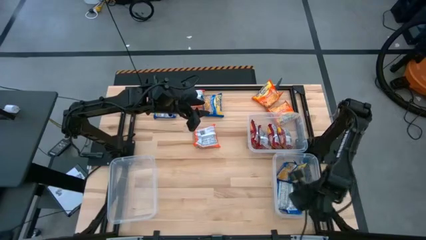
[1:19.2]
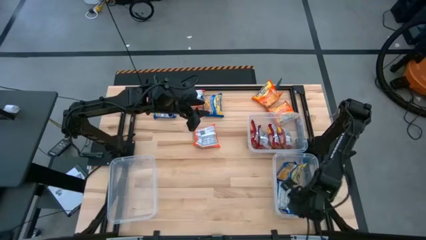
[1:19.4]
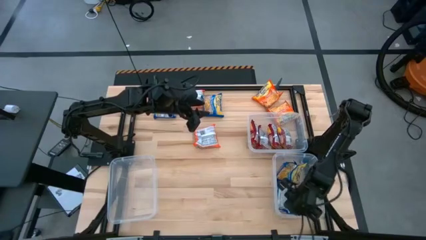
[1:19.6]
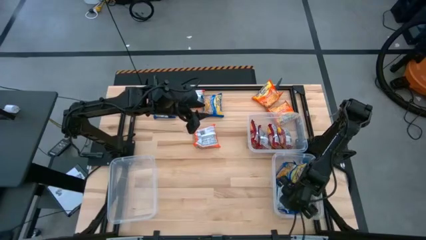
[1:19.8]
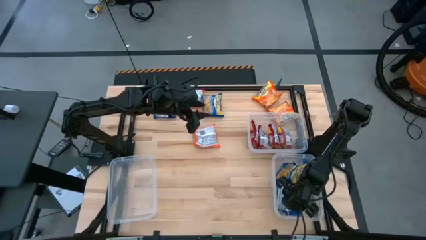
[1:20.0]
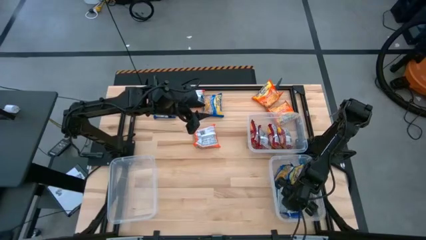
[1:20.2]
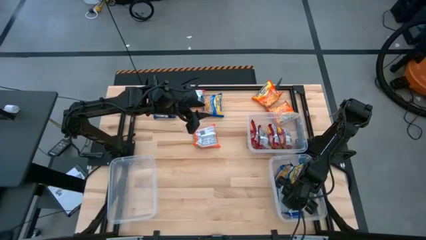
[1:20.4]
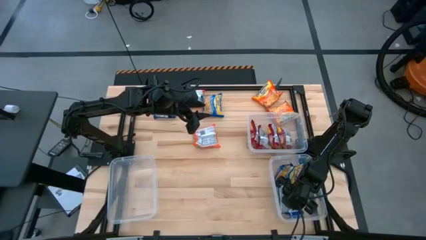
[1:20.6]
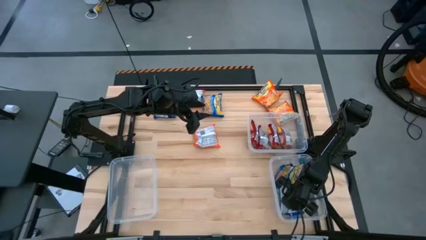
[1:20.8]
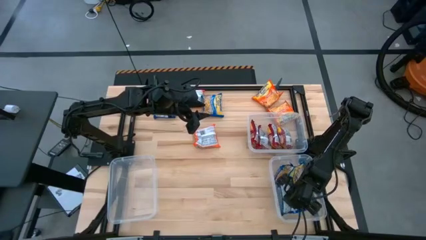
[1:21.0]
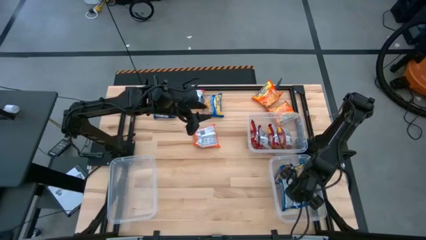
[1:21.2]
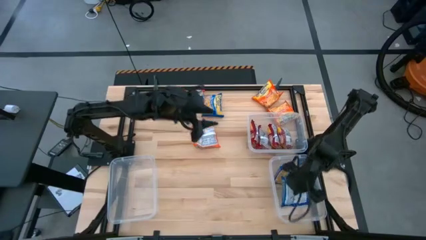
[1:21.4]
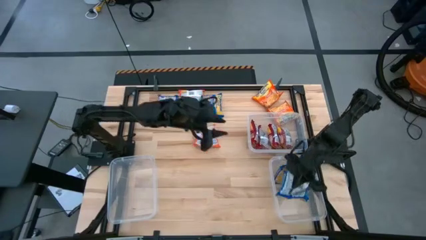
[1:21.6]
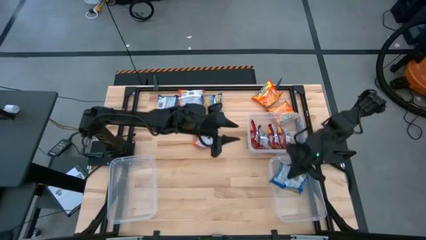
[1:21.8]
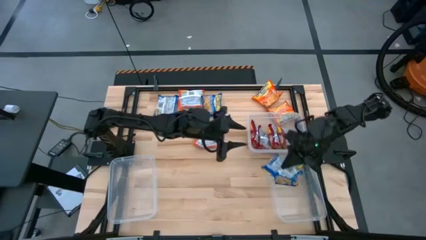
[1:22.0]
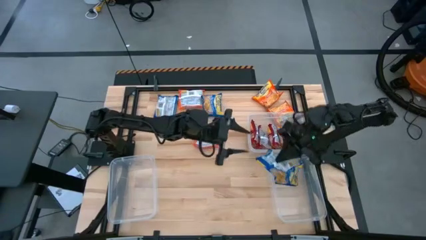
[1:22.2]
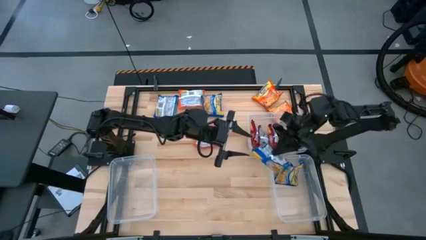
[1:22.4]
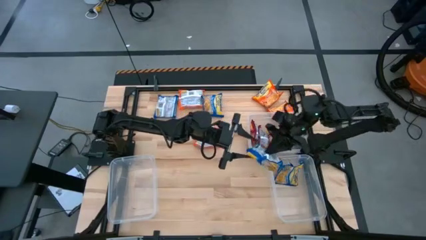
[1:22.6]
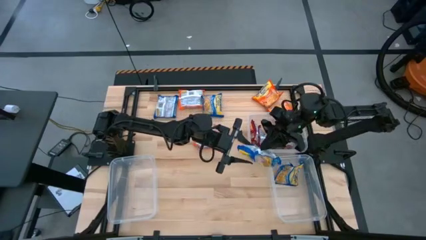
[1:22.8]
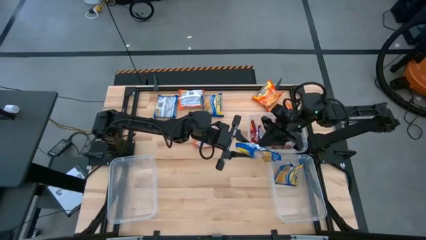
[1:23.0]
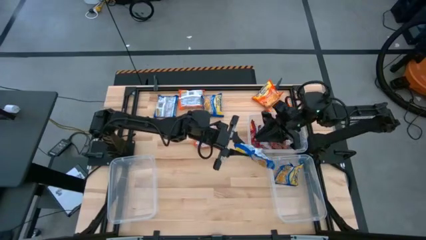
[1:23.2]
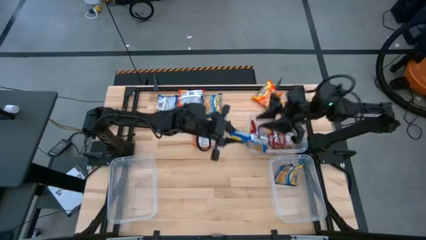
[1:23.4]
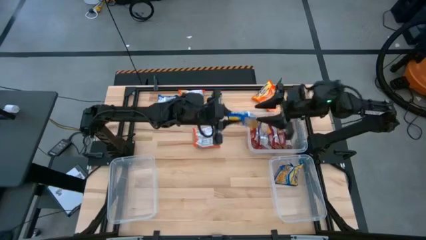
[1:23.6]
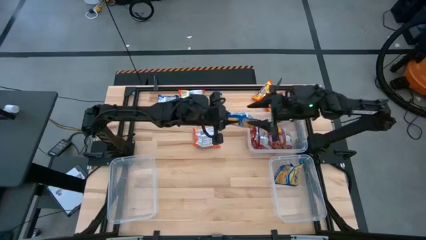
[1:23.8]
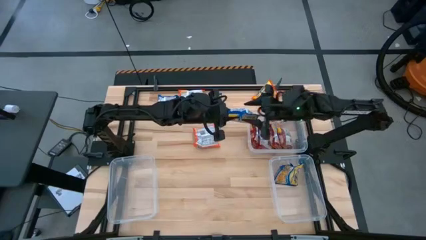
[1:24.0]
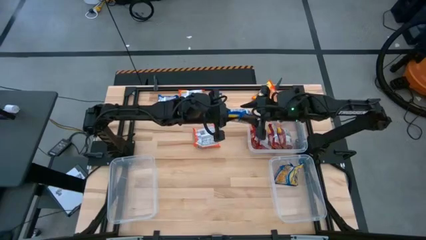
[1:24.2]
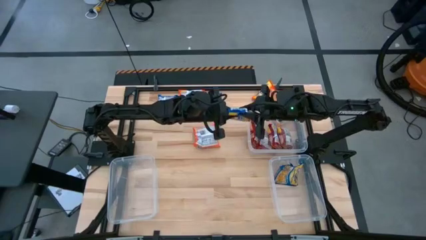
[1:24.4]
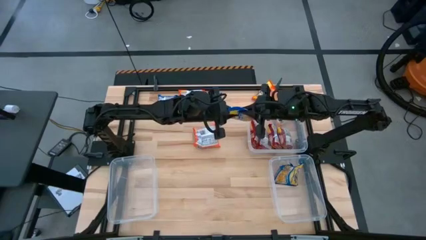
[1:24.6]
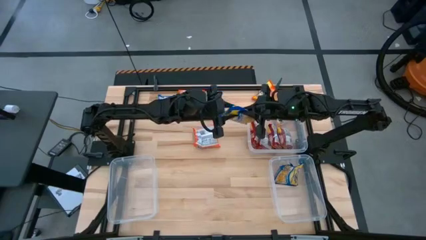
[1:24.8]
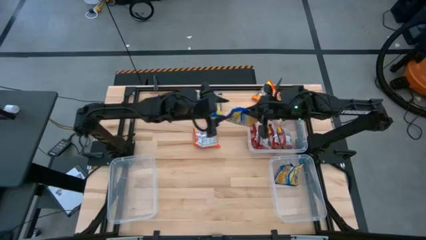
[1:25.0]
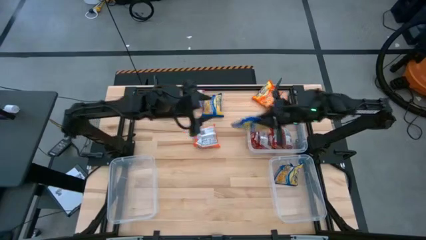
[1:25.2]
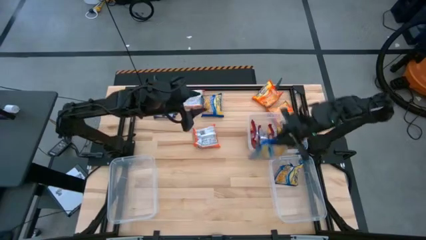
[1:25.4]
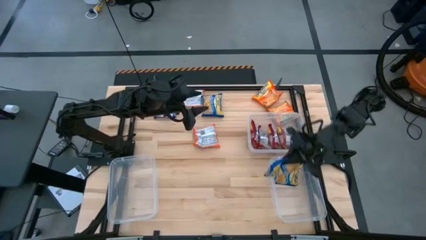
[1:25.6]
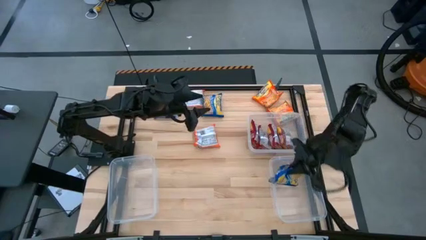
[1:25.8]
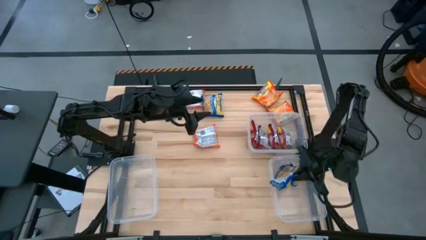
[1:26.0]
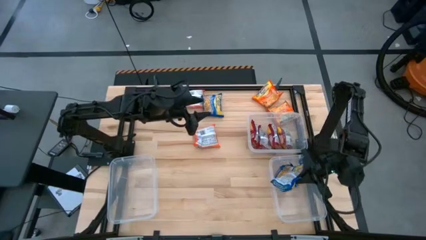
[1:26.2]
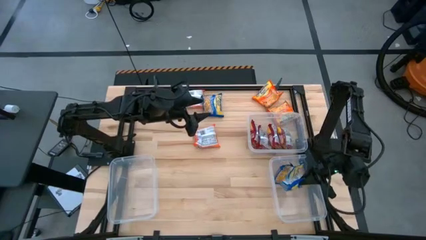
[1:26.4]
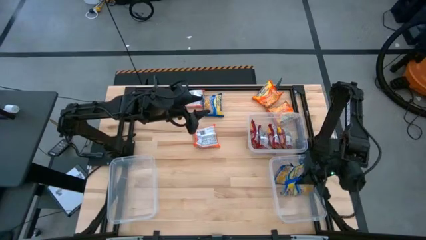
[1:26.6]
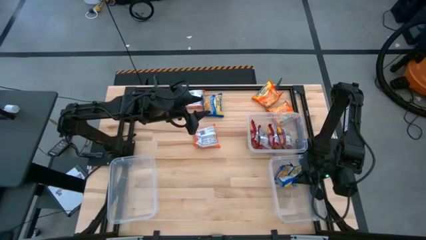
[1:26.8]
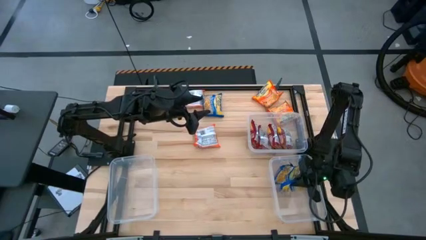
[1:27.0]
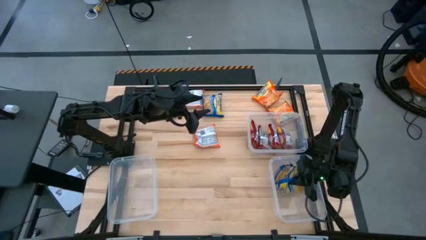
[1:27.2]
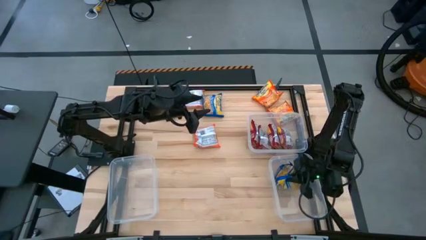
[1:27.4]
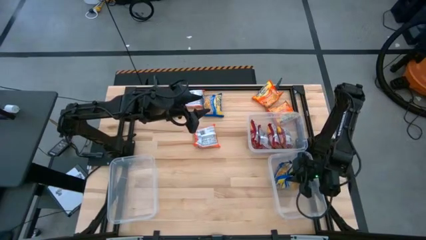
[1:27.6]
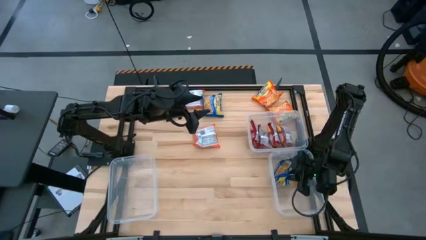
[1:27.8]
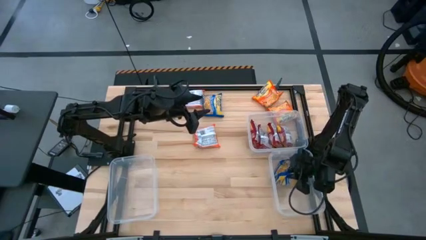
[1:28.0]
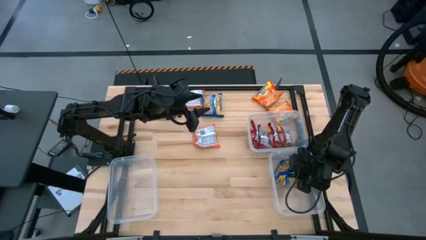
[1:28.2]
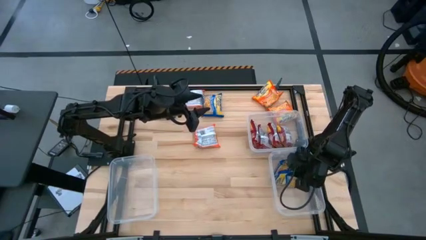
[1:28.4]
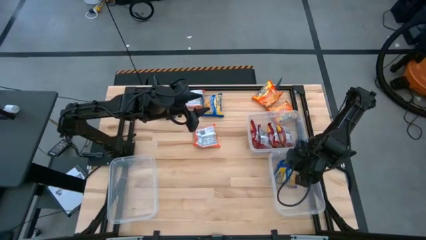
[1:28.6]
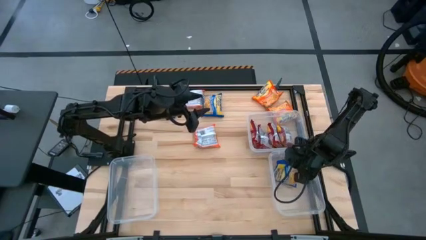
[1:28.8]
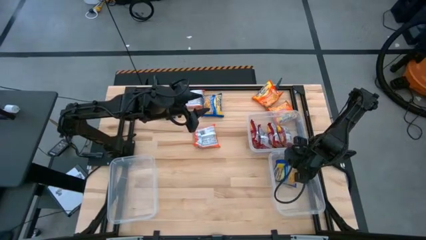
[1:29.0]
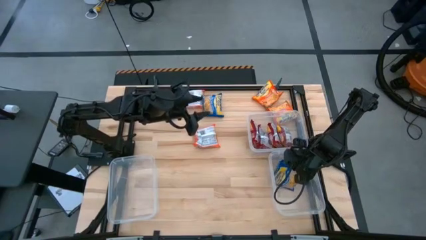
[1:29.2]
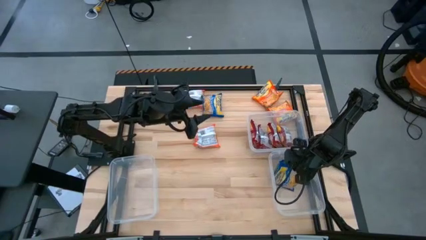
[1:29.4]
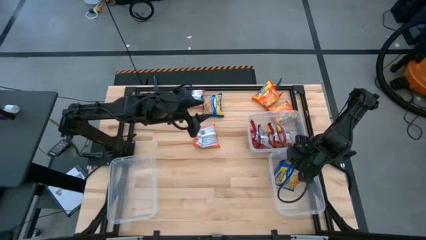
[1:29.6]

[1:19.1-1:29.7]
Task: Sort Maruchan noodles
Adjust the blue noodle packs in container

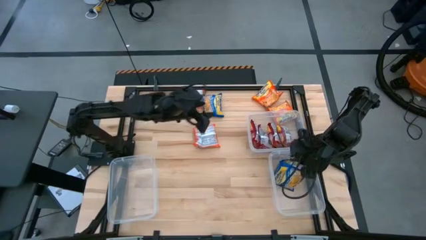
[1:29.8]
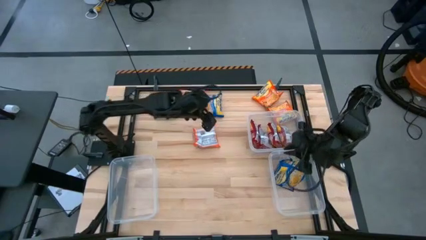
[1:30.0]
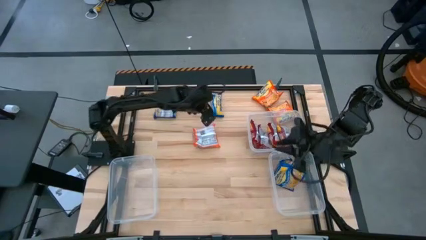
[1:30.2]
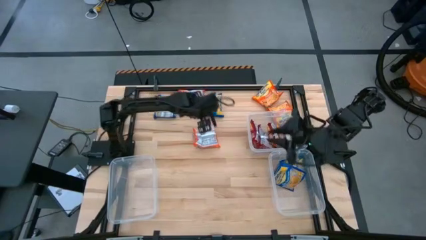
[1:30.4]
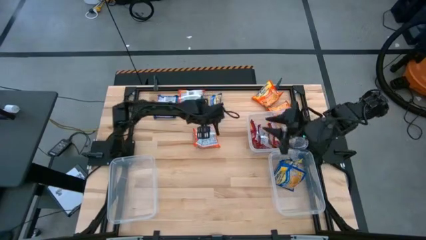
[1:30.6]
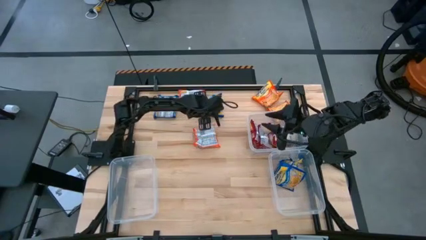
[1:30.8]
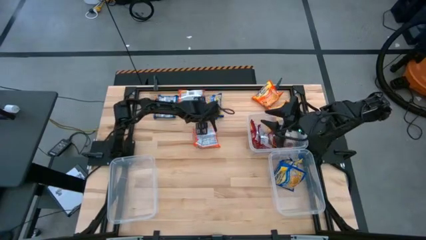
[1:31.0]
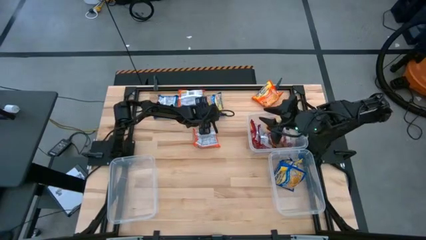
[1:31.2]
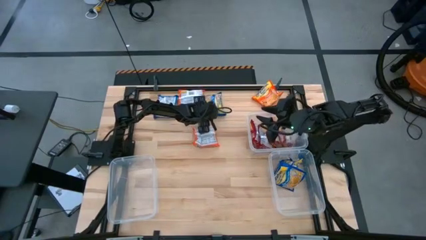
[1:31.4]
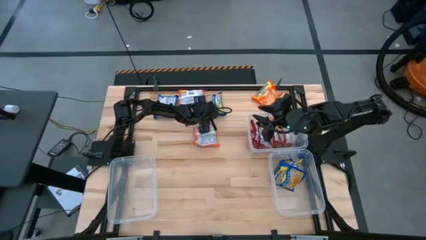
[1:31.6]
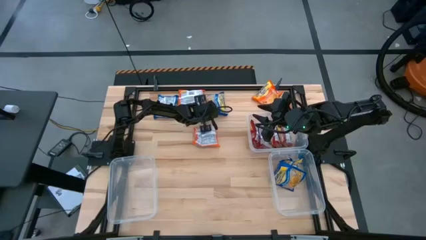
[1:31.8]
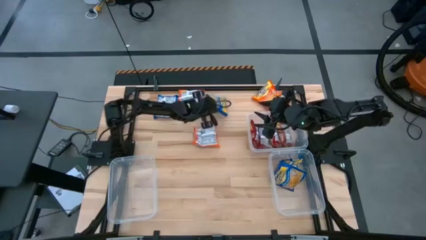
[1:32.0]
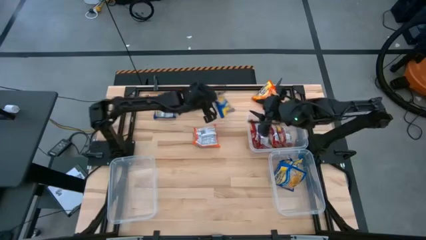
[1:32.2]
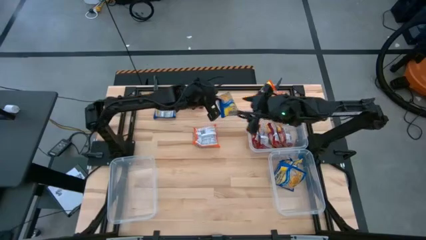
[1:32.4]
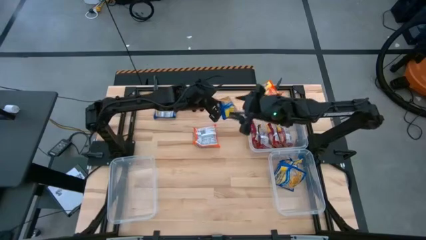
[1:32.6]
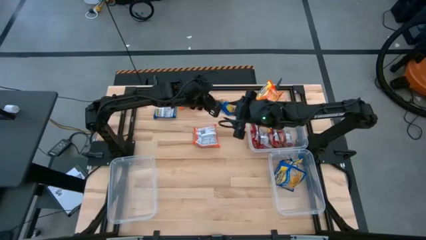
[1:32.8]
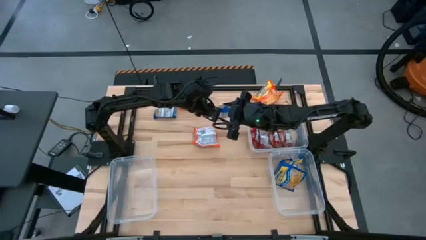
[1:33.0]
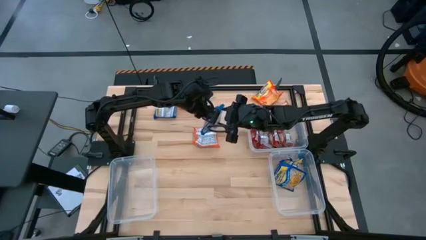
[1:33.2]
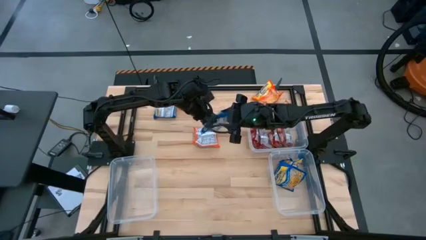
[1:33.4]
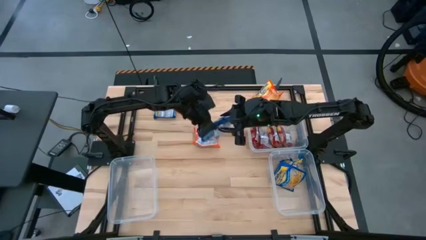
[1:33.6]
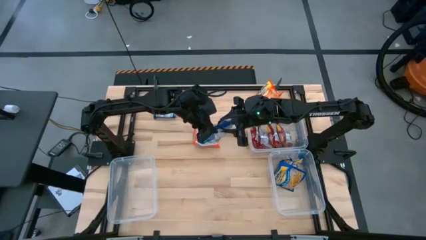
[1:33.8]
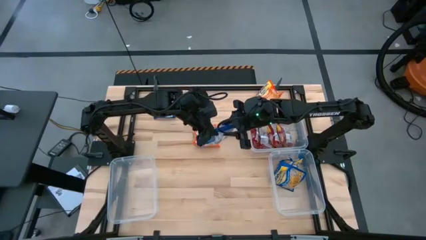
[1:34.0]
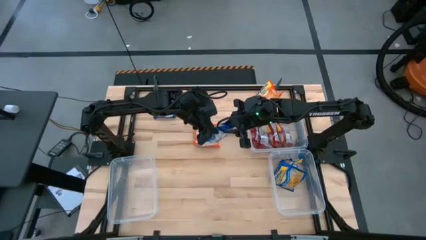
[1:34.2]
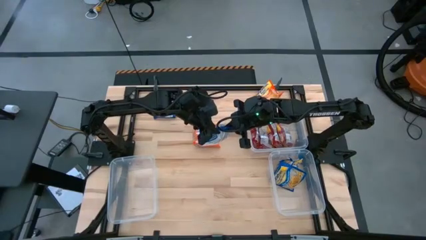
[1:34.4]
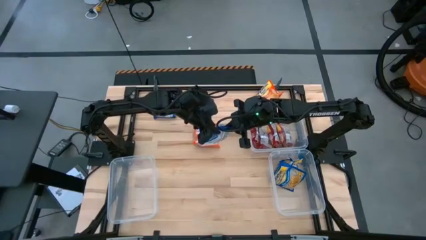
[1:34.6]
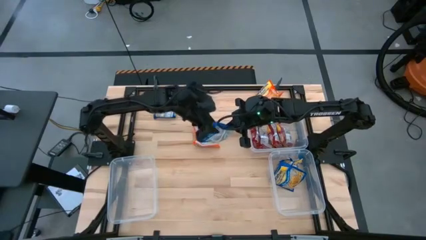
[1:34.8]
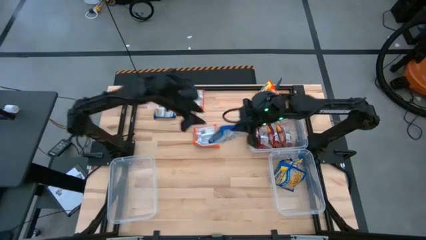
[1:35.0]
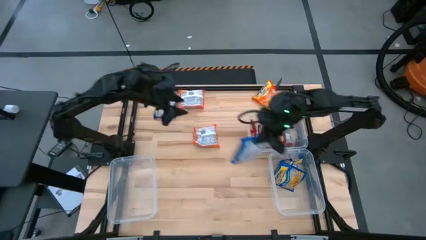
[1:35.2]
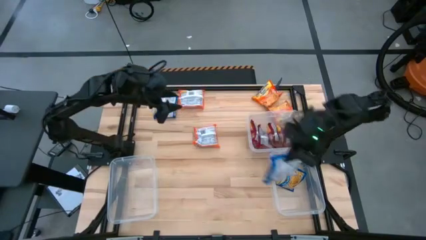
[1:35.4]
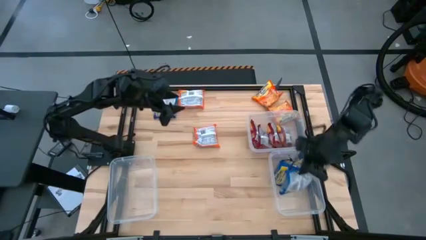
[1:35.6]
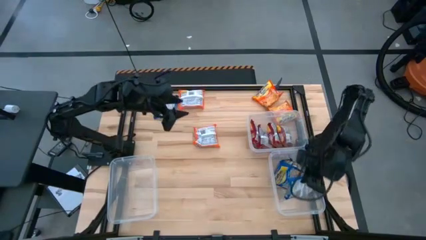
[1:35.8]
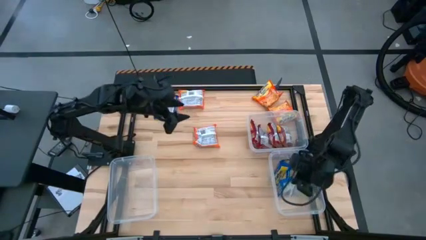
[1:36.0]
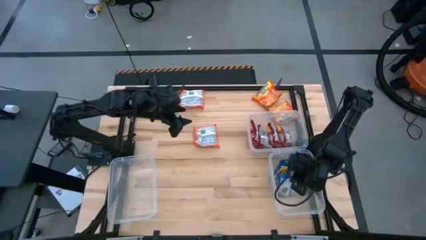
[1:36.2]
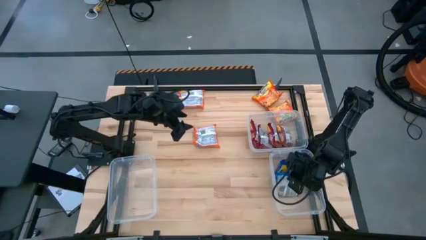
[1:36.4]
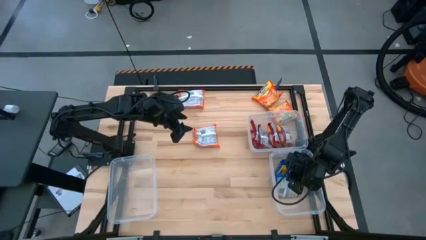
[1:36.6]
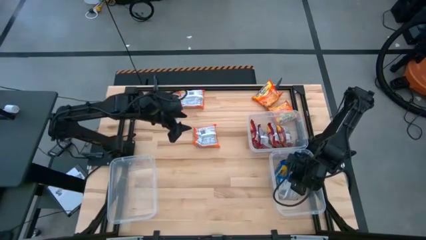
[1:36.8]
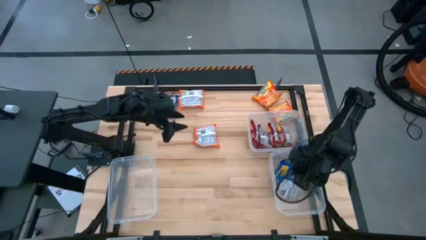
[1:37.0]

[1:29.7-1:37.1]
Put the blue noodle pack into the bottom right container
